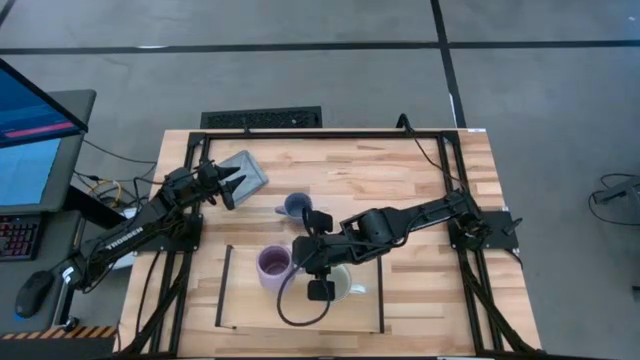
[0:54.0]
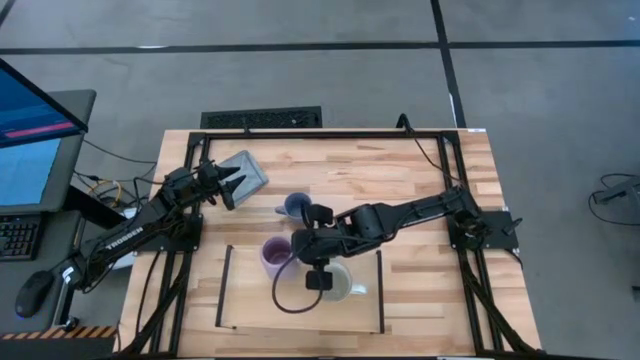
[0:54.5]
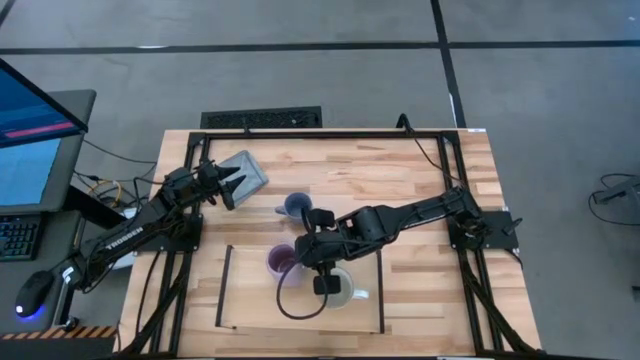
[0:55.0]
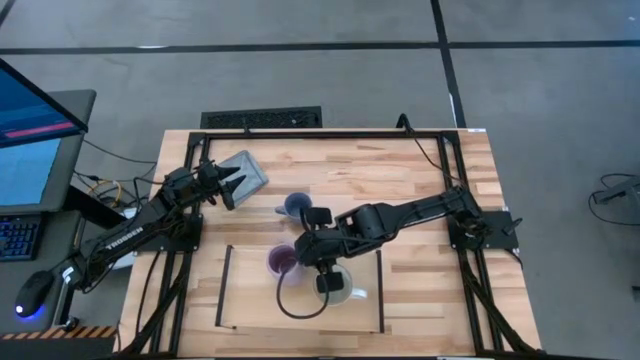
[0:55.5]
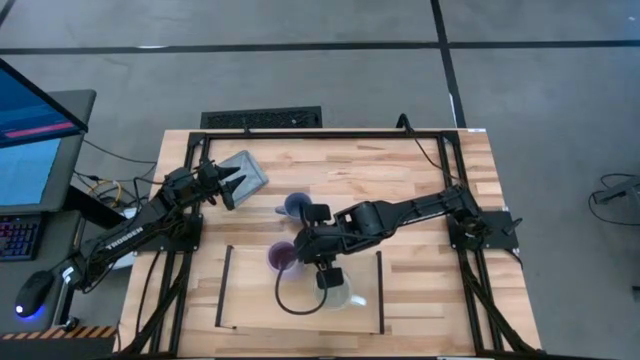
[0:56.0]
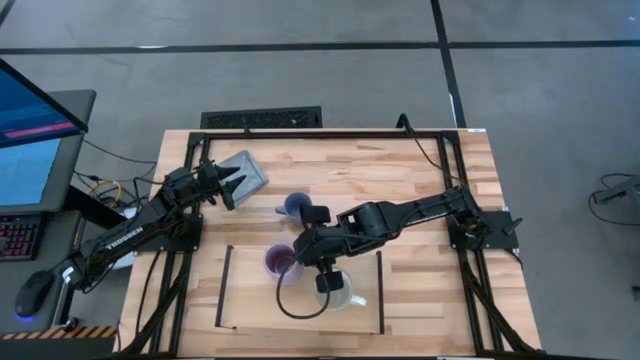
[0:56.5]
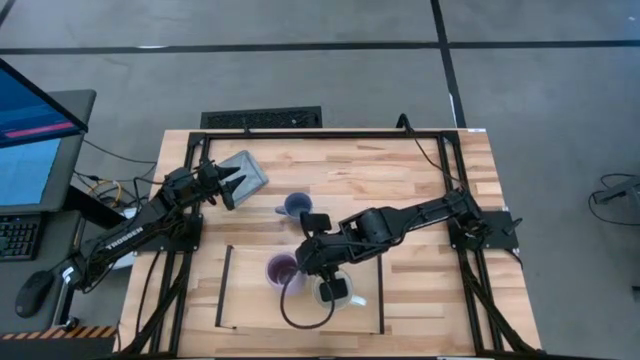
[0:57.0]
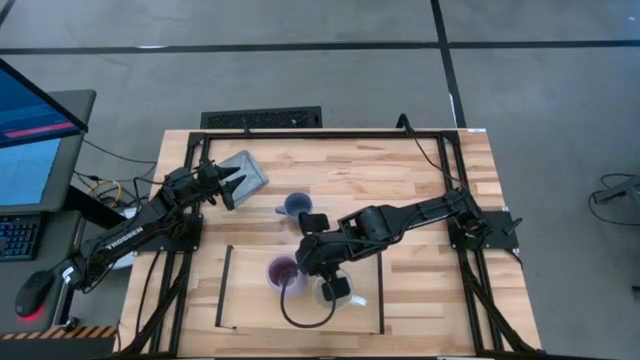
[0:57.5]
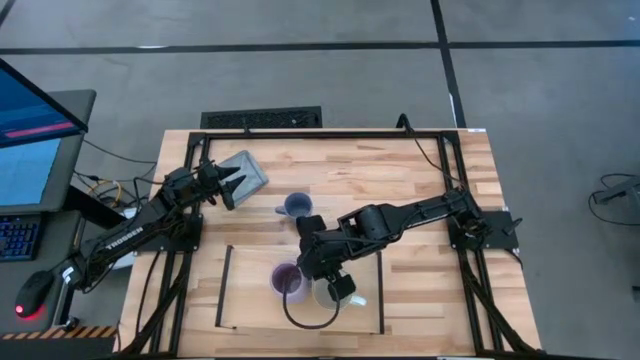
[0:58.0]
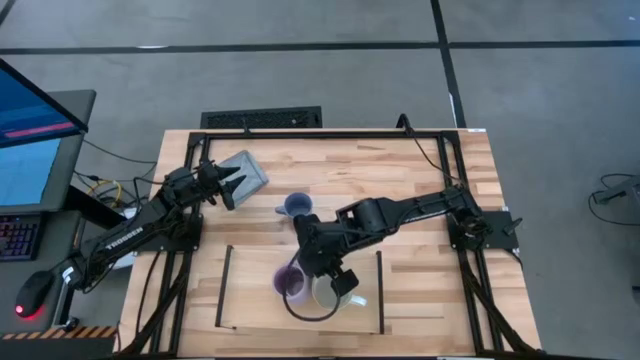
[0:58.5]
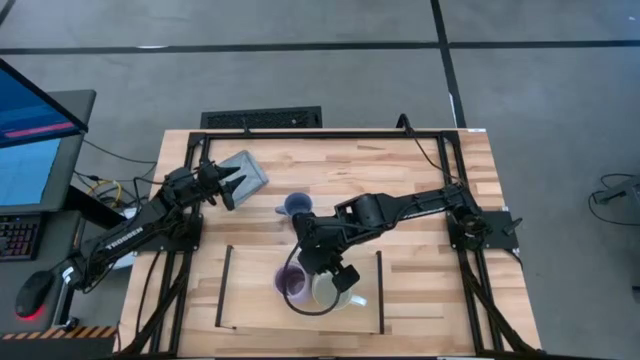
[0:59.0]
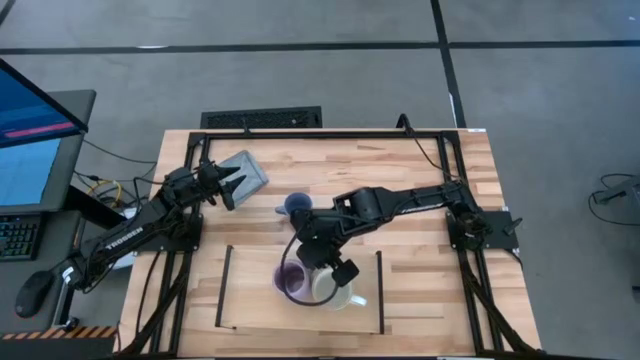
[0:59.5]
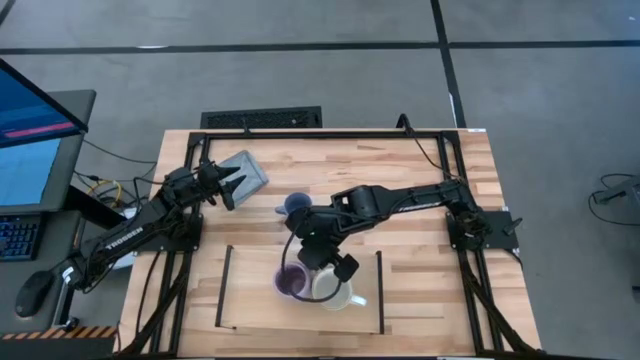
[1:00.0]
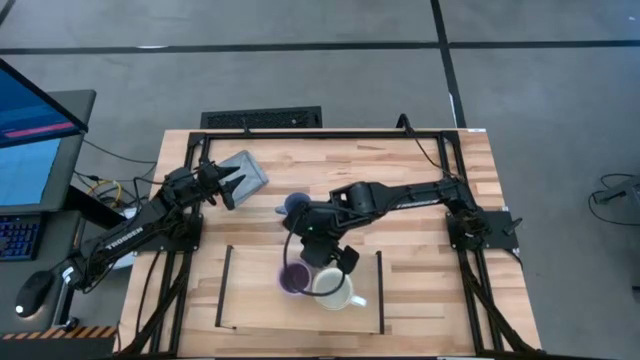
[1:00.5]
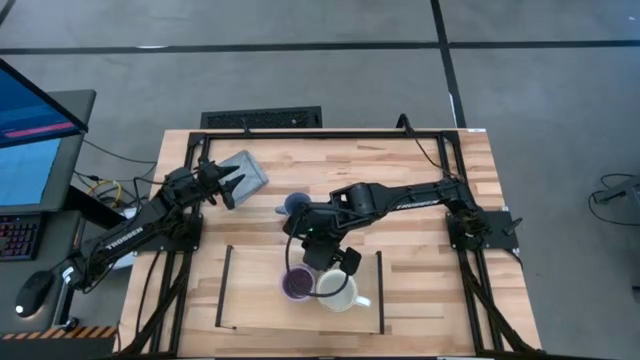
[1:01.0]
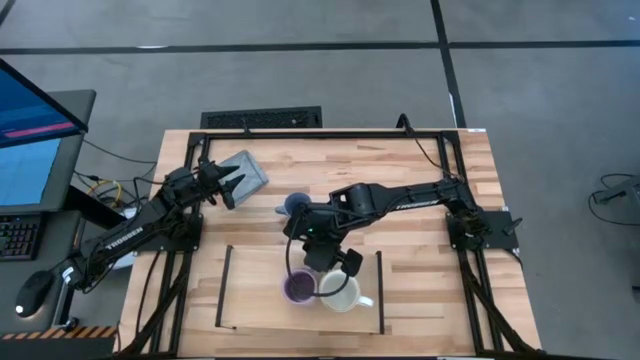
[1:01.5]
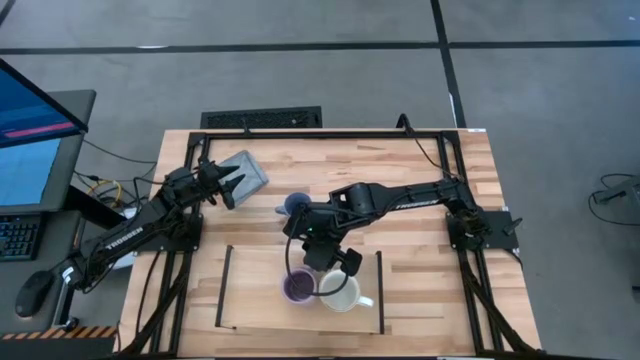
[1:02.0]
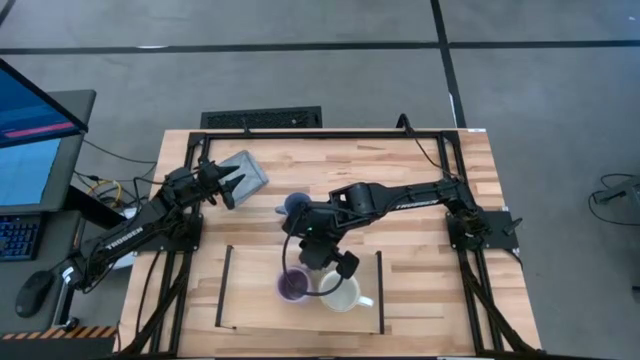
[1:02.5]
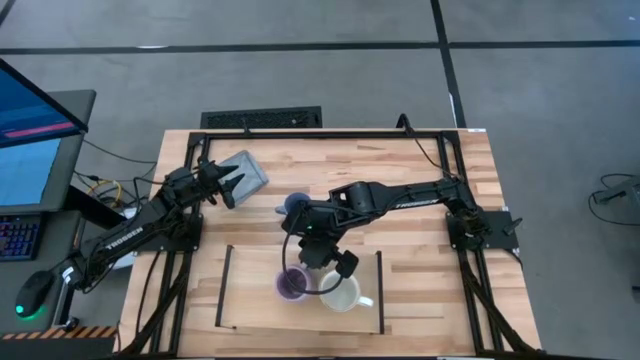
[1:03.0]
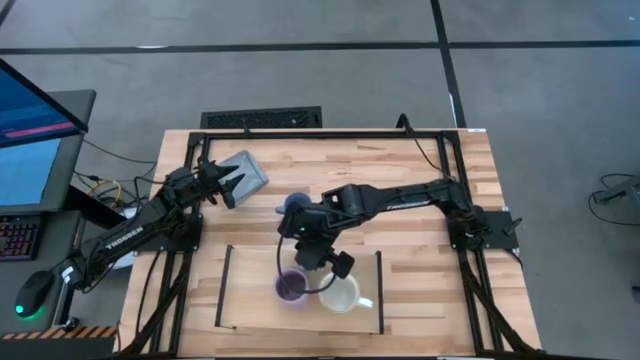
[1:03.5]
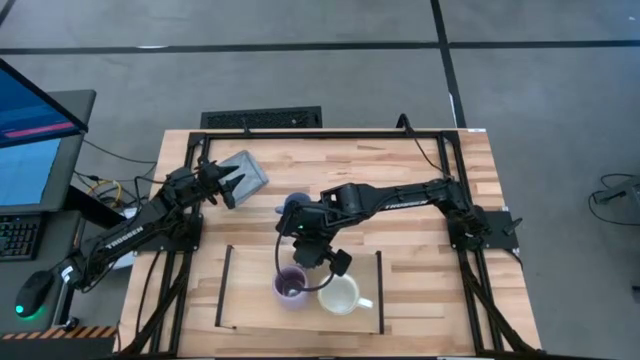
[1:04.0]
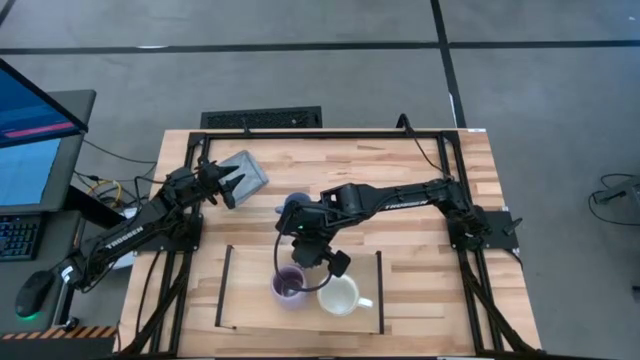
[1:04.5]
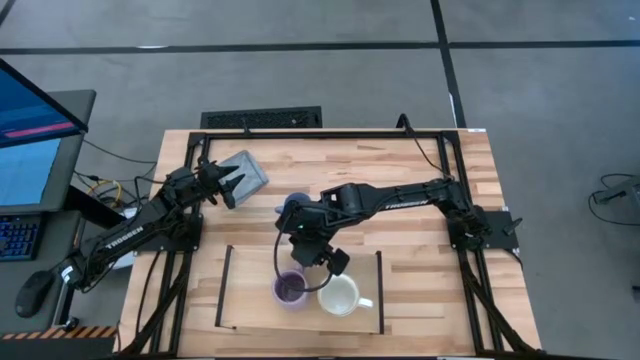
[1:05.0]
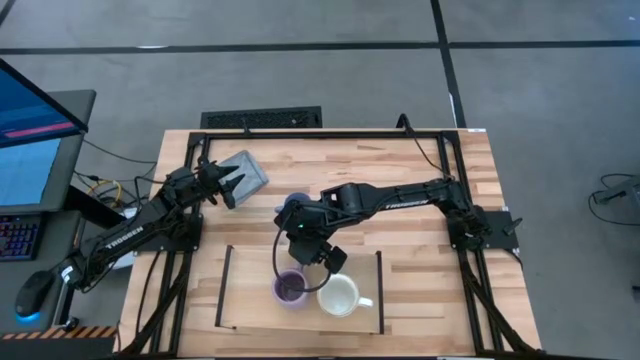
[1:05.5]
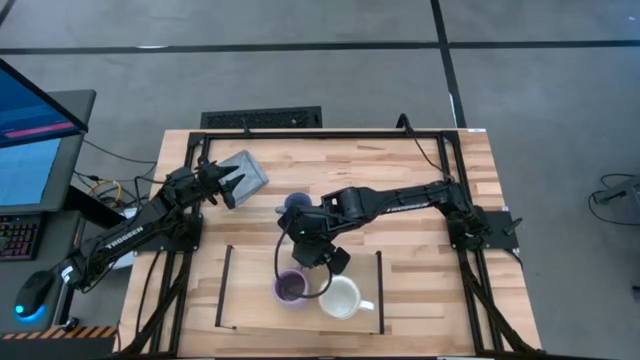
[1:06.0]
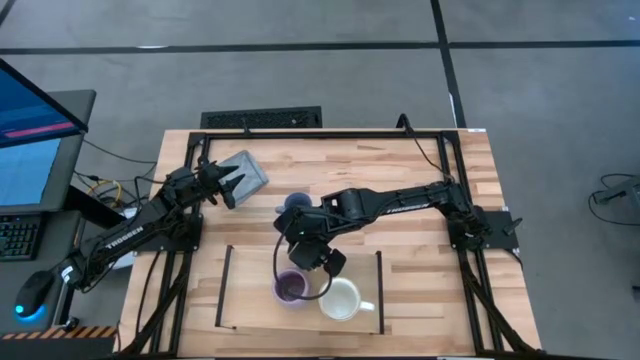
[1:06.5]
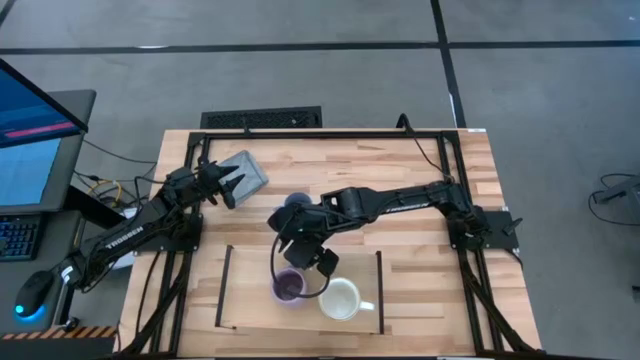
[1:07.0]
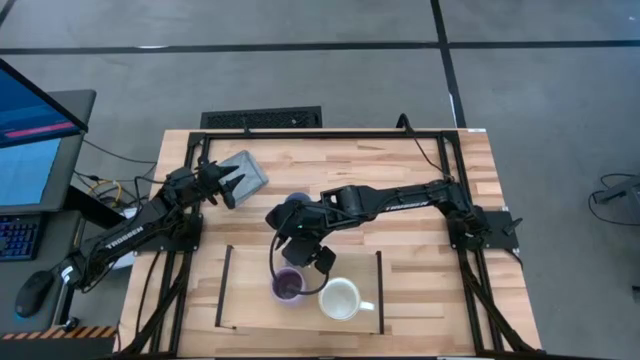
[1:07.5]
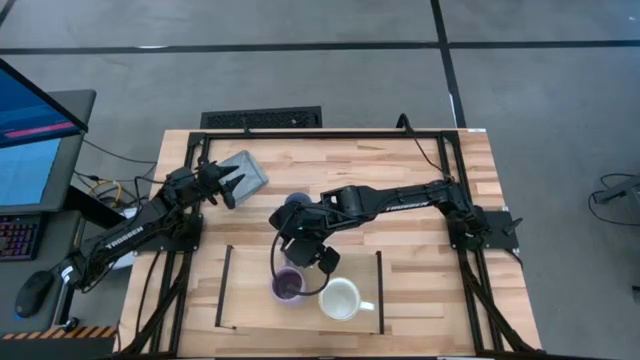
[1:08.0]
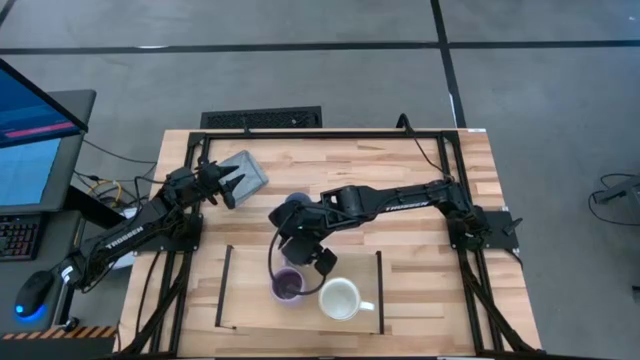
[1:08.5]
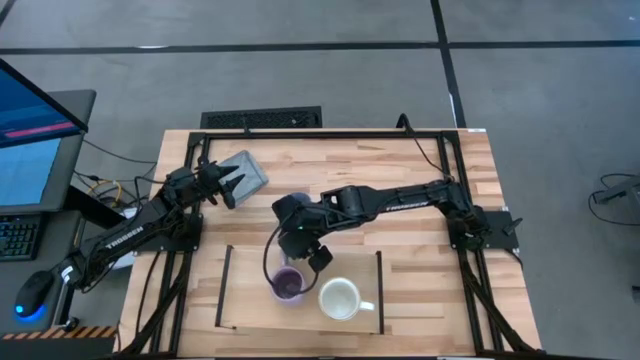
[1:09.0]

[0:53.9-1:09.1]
Task: Stack small to large cups/mugs on shelf
Put the purple mug on the shelf

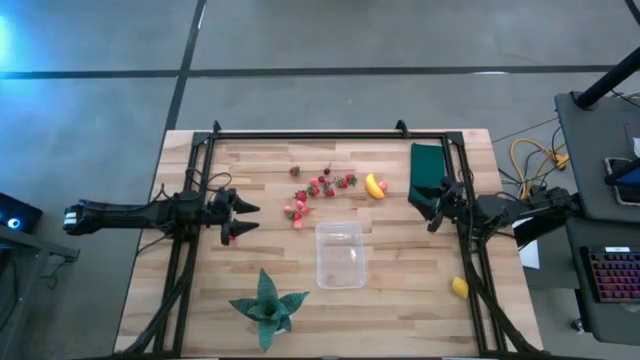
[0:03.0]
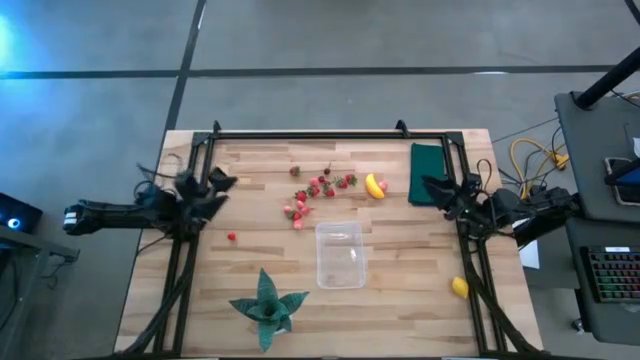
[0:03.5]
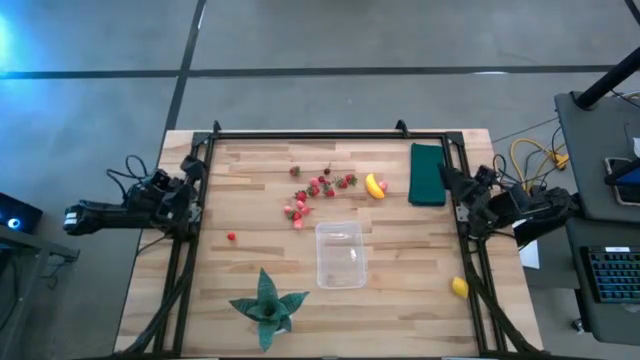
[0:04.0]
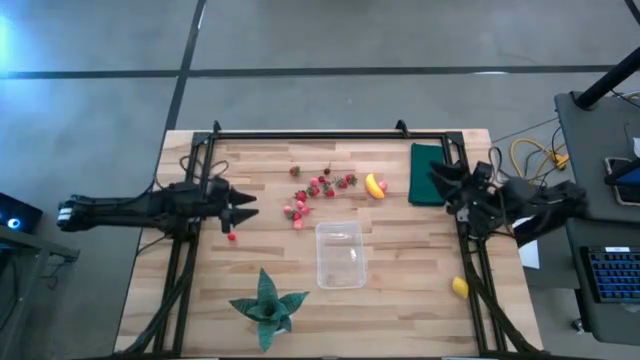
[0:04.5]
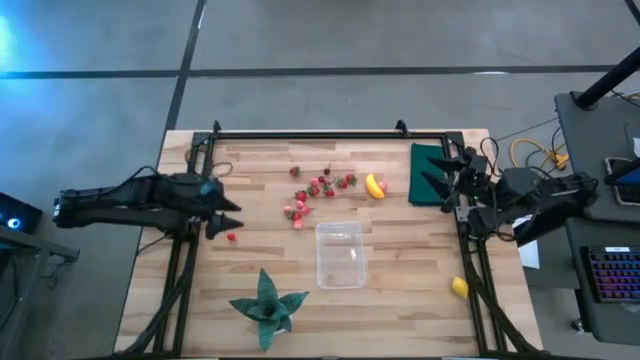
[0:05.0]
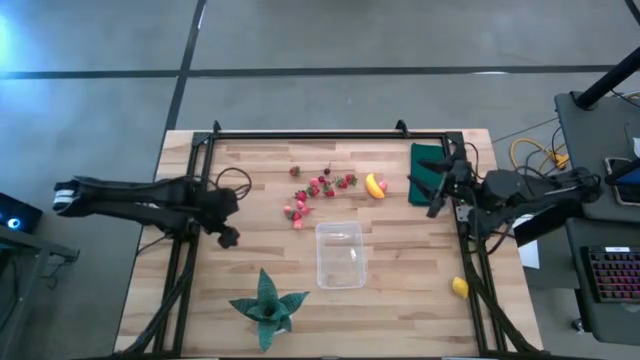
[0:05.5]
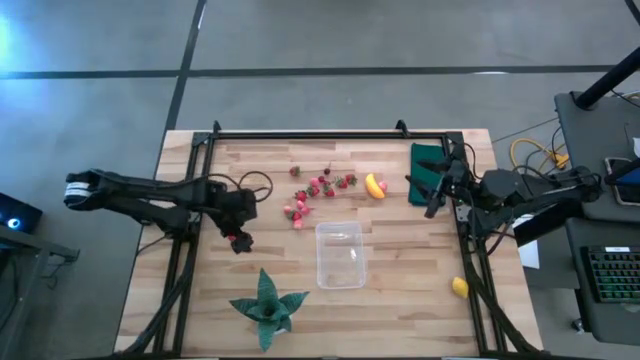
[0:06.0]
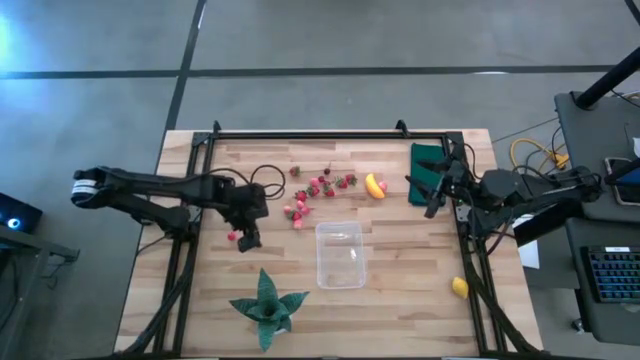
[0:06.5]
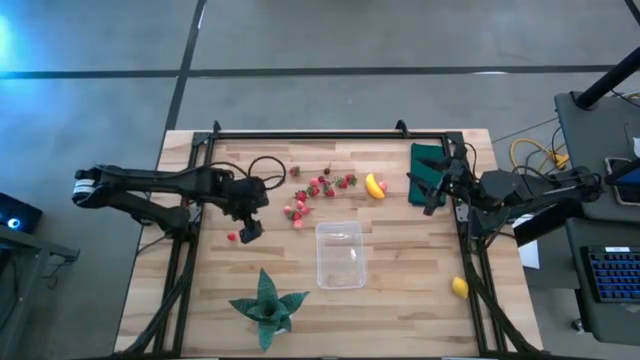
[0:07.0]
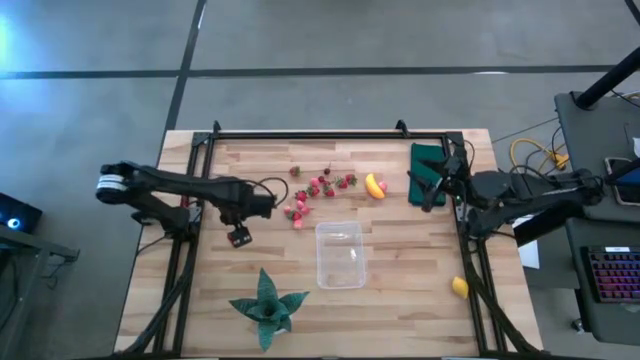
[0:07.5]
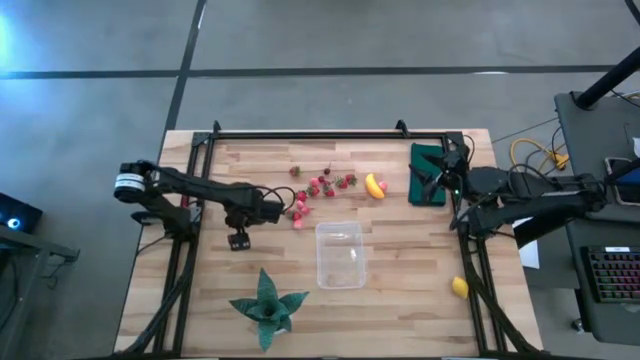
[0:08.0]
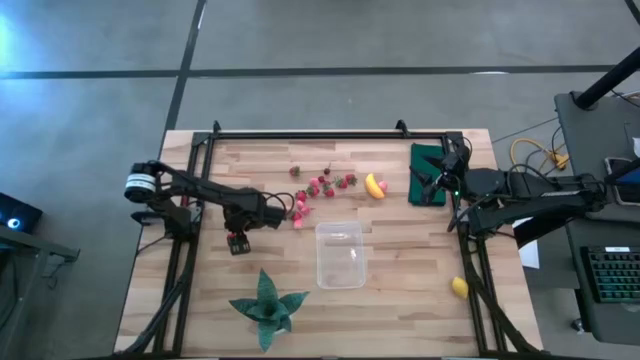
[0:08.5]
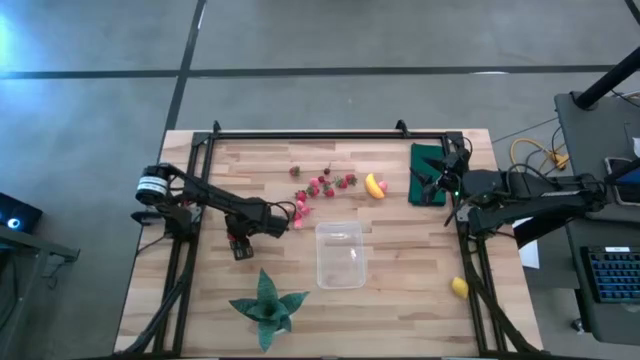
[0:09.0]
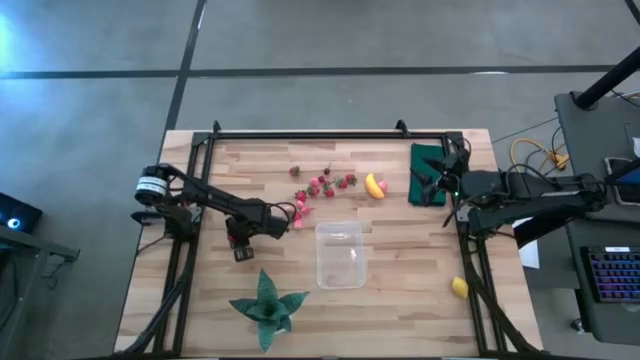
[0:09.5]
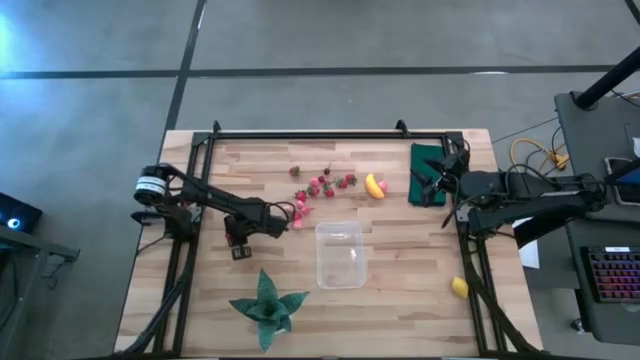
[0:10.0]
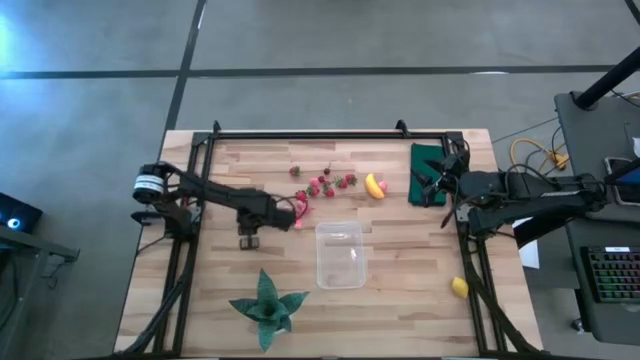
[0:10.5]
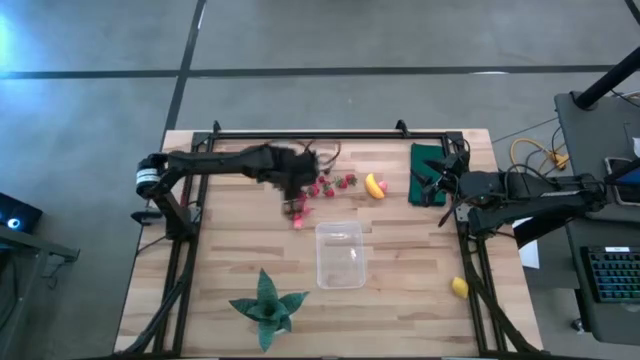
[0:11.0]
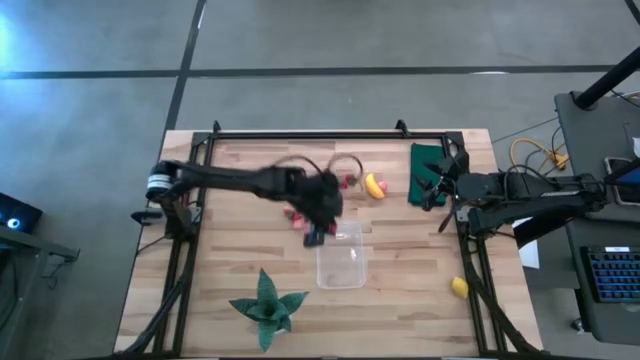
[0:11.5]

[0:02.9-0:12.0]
Task: Pick and placing Produce into tupperware
Put the cherry into the transparent bin
